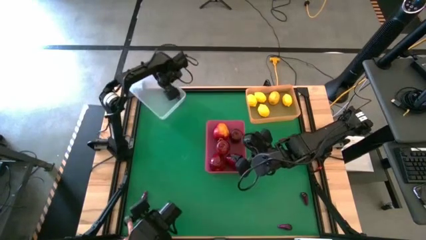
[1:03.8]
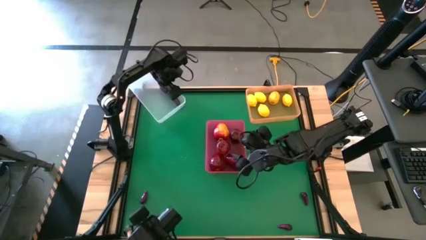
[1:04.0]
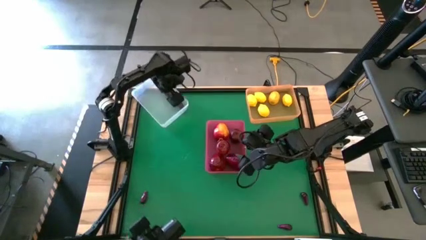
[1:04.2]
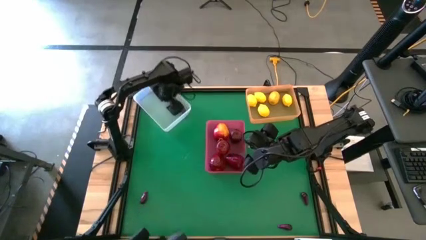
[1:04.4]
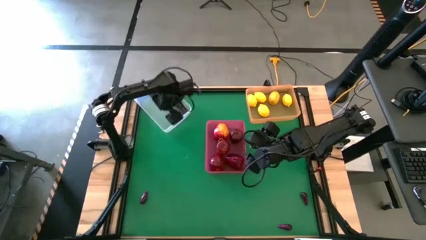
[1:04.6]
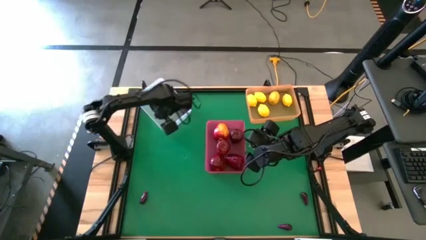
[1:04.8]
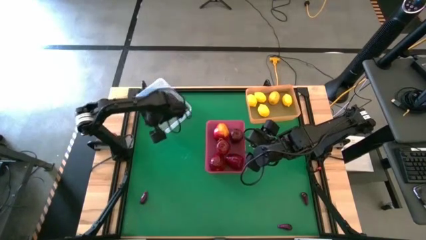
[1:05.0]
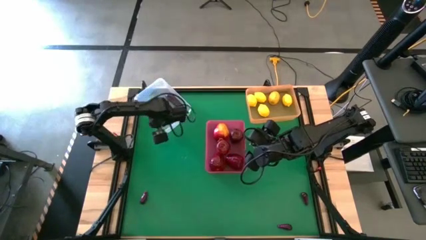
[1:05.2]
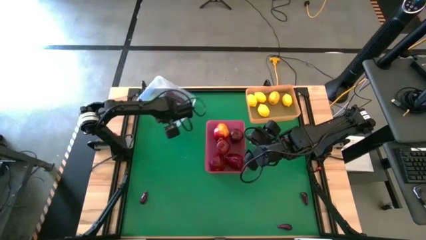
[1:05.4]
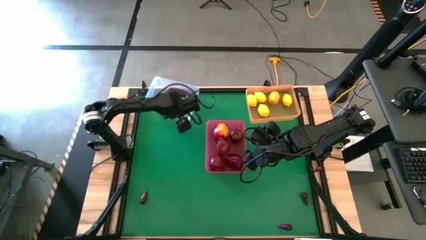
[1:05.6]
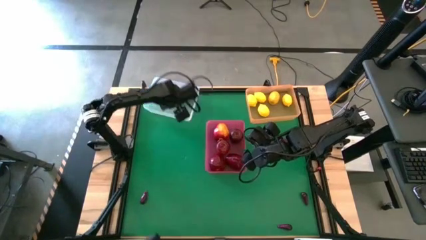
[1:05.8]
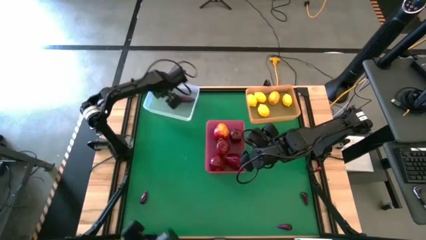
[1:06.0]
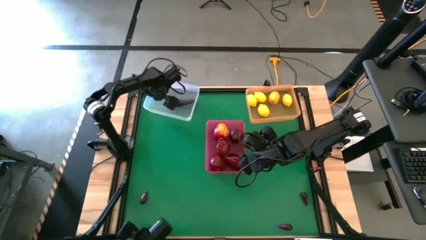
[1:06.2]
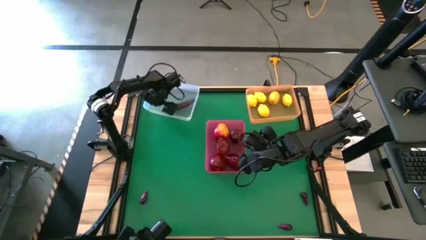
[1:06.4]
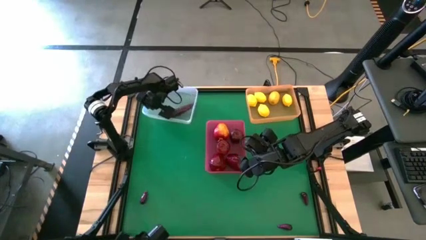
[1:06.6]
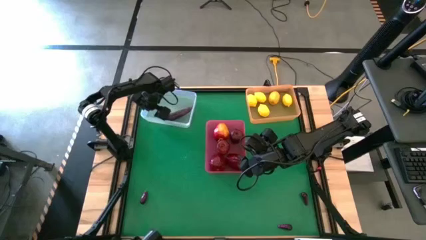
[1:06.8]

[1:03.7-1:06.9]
Task: Sort produce into baskets
Adjust the white bin

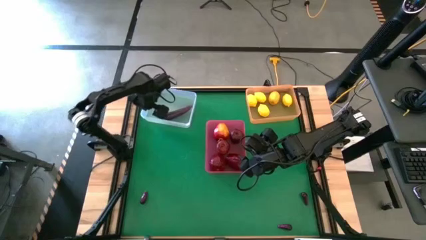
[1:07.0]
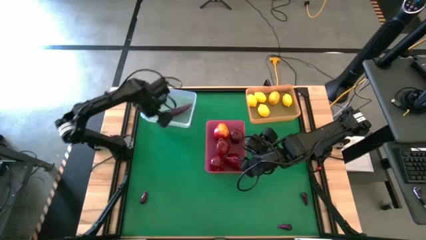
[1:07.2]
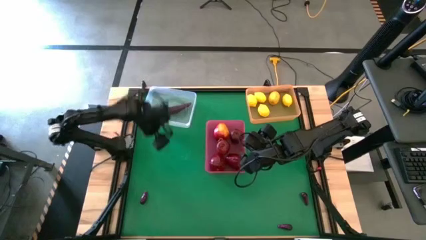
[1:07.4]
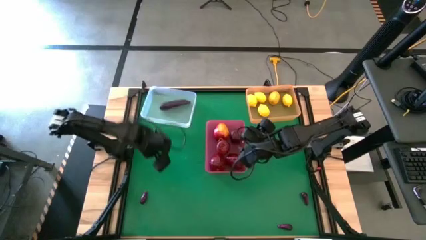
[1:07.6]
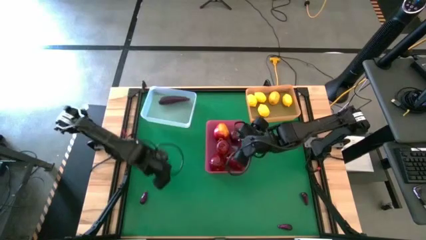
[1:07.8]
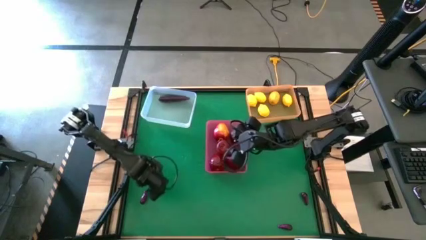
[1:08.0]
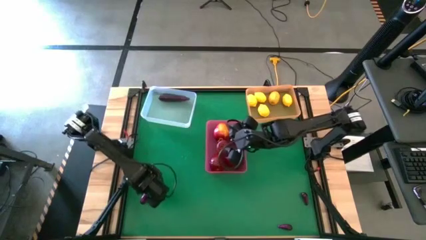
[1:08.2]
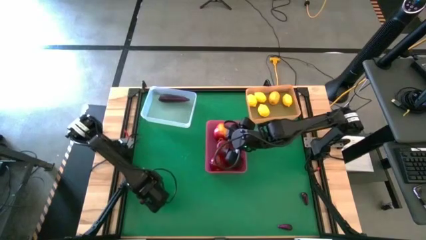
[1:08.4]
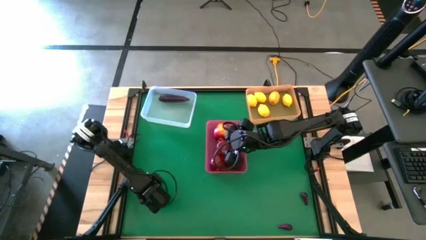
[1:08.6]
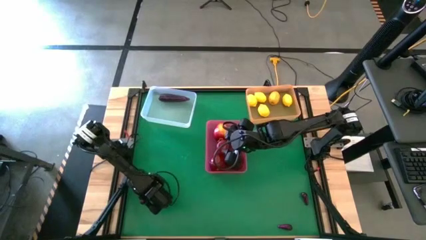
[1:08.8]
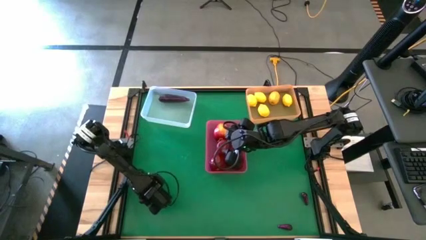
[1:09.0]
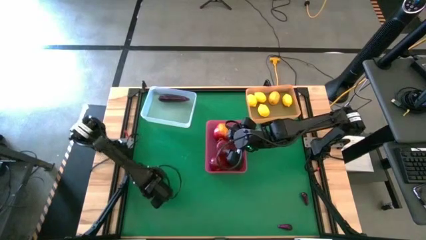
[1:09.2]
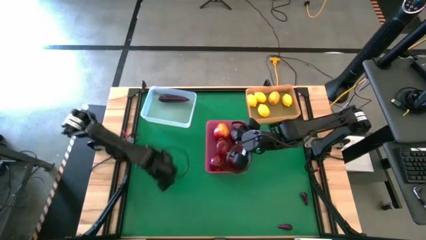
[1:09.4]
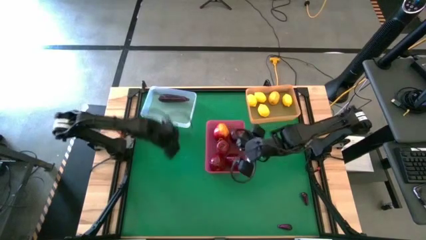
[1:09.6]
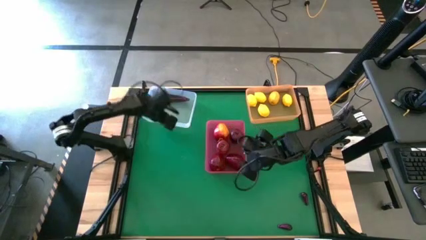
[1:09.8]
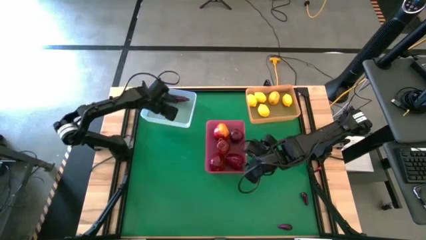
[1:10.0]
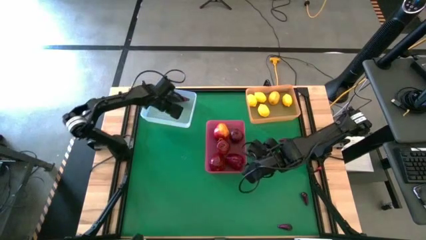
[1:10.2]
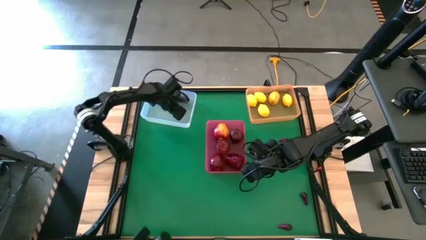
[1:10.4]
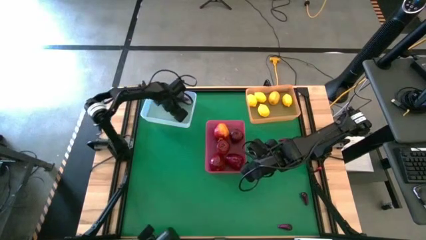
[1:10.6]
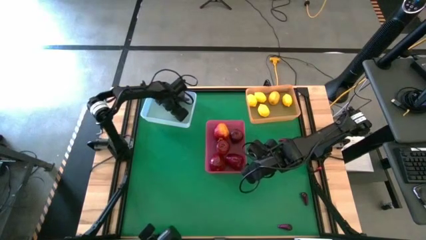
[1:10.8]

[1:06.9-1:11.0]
Put the eggplant into the white bin

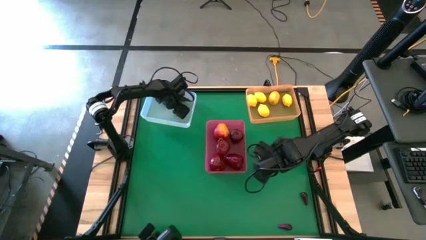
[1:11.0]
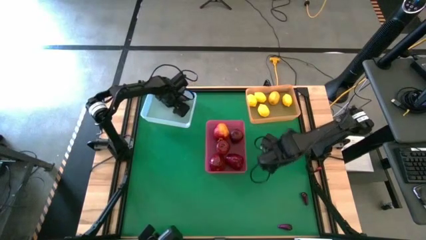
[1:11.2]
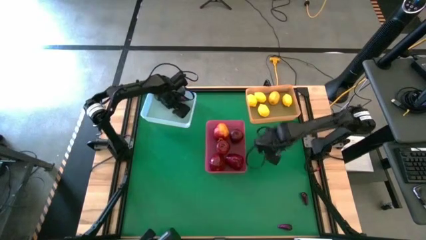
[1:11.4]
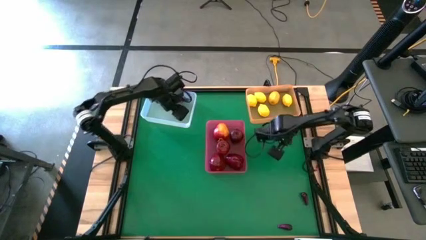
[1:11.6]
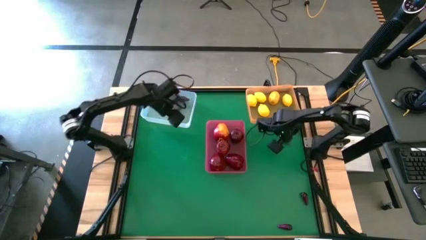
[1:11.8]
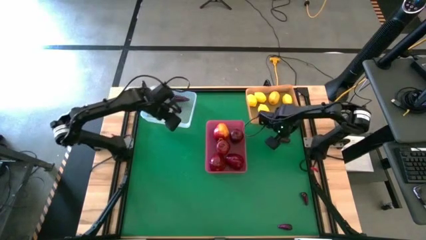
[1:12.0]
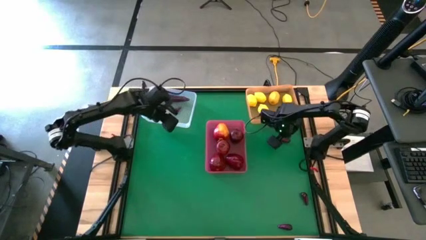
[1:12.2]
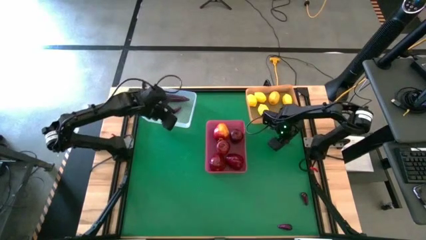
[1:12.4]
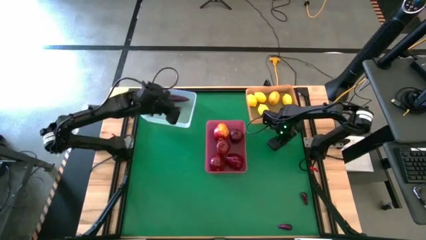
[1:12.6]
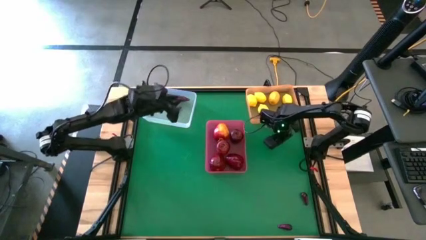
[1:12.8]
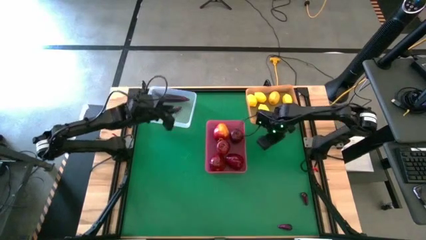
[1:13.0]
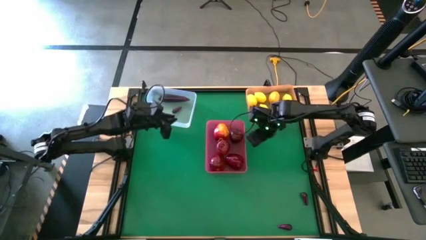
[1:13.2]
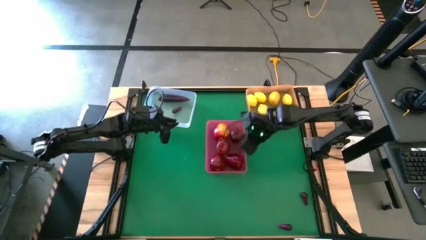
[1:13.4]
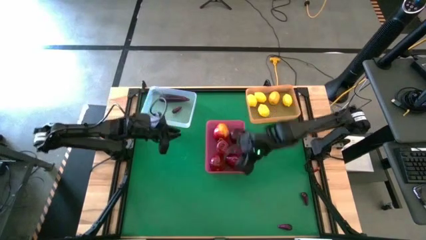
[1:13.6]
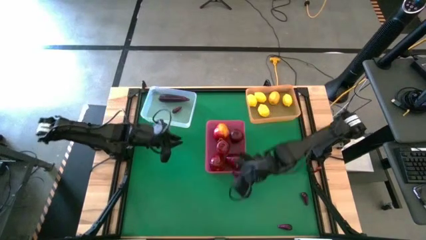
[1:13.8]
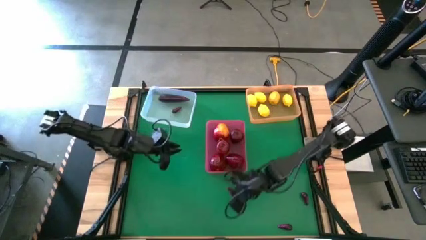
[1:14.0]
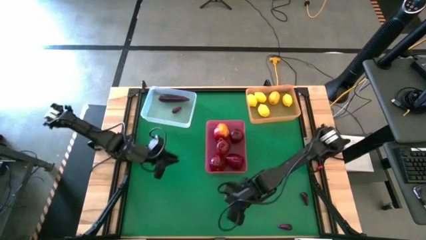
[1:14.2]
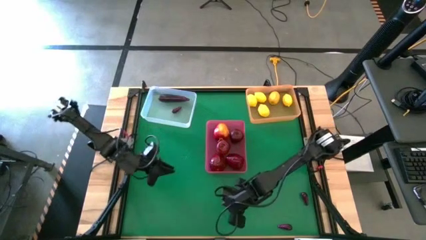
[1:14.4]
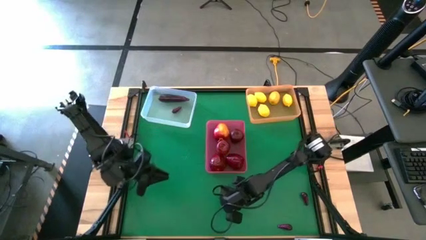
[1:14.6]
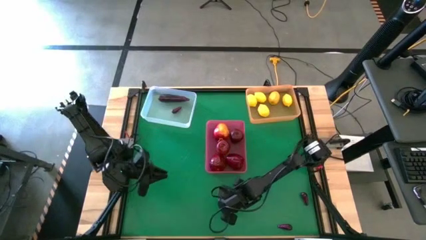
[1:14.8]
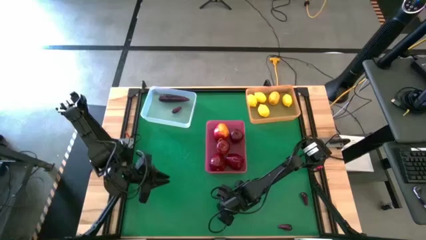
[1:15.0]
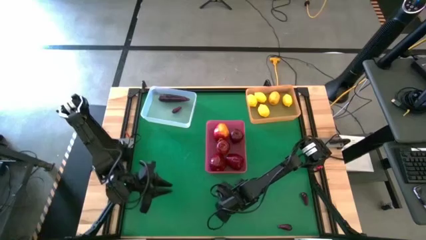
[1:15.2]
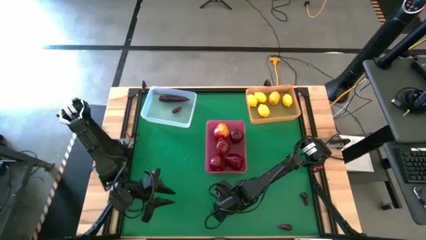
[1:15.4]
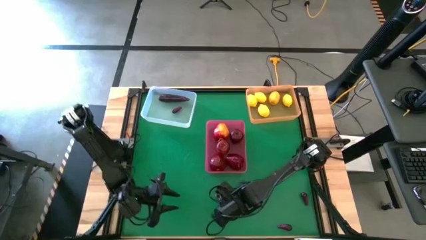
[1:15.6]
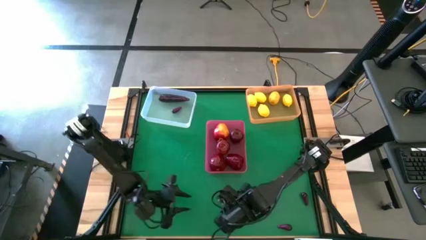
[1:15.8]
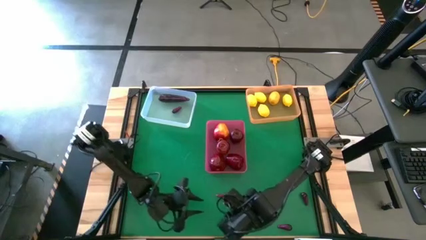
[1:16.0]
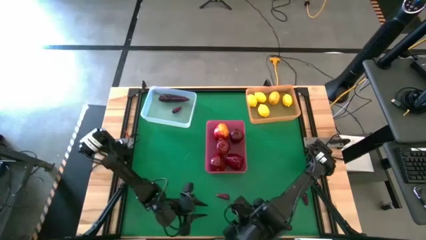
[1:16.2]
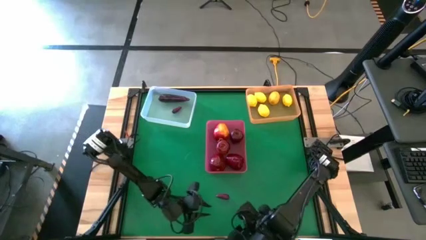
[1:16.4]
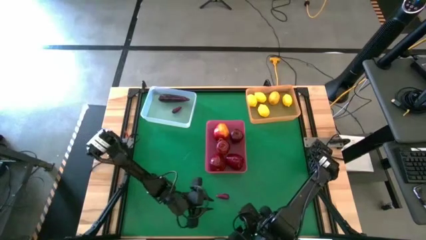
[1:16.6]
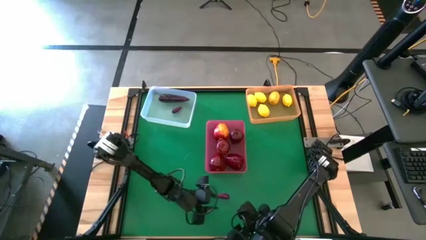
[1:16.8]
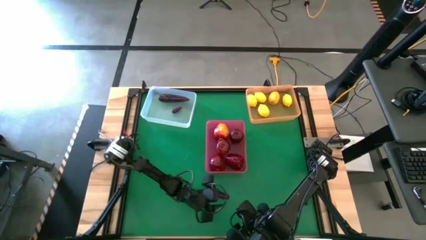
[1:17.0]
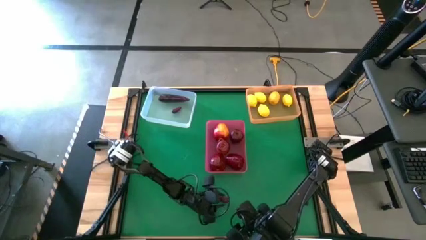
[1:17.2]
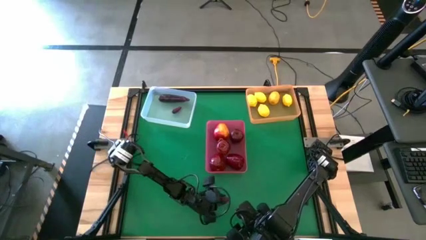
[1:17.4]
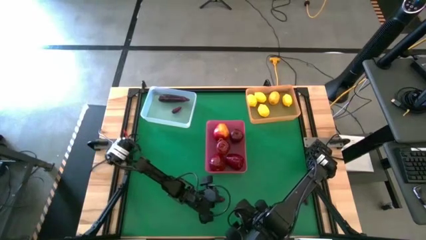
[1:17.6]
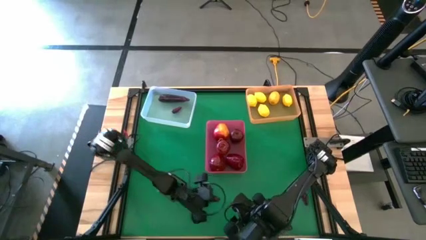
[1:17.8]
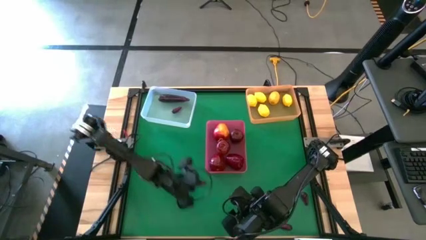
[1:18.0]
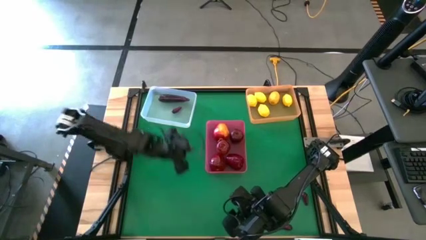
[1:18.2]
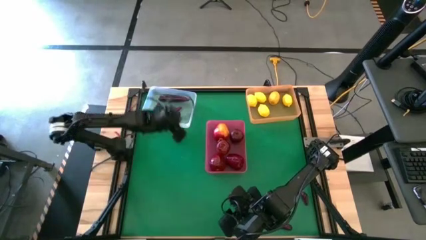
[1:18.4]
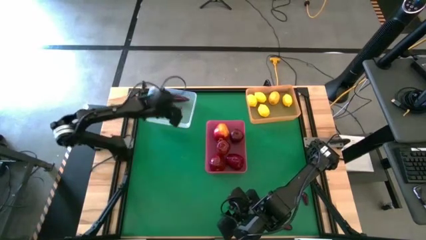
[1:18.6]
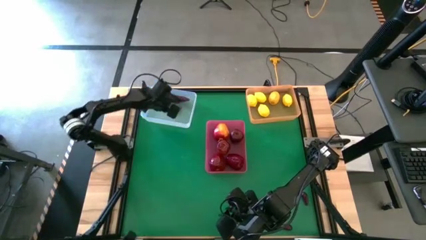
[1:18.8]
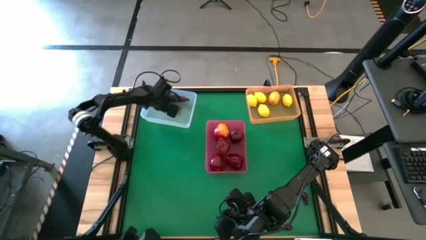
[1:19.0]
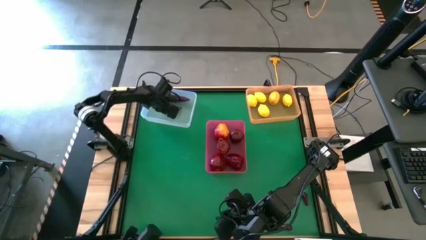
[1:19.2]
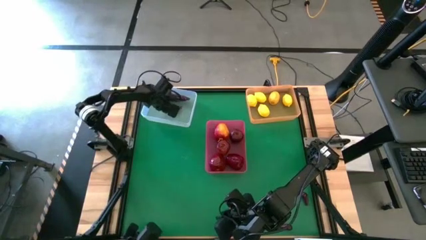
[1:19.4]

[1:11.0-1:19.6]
Put the eggplant into the white bin
